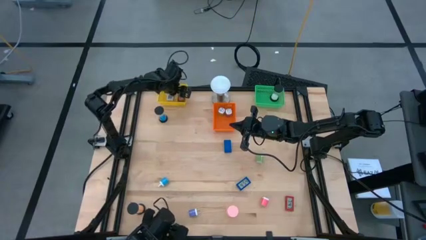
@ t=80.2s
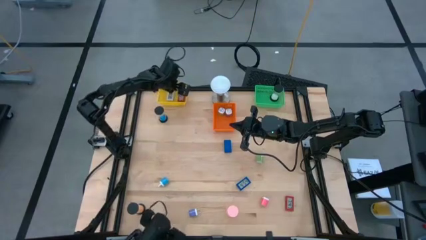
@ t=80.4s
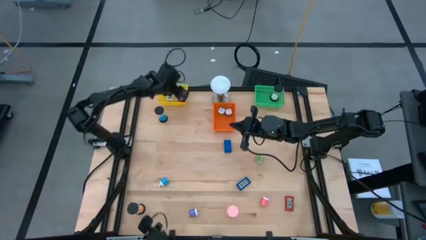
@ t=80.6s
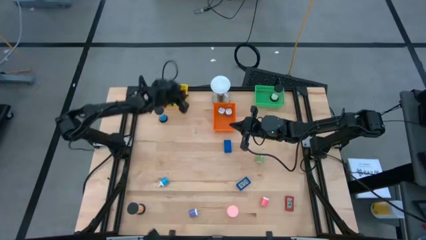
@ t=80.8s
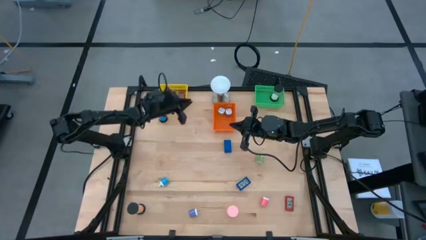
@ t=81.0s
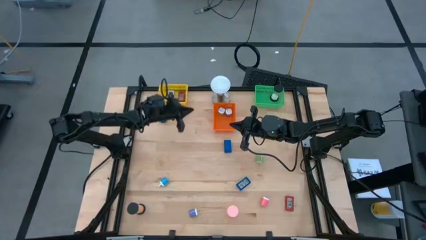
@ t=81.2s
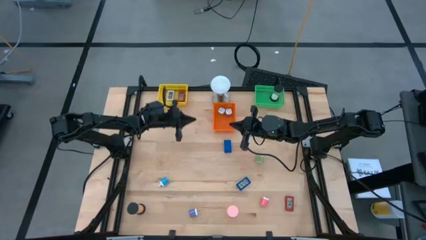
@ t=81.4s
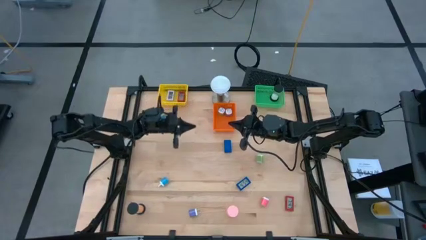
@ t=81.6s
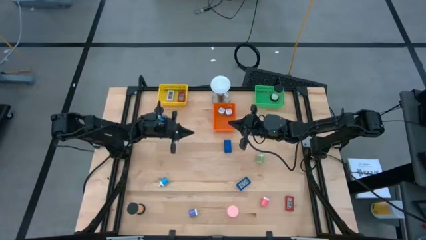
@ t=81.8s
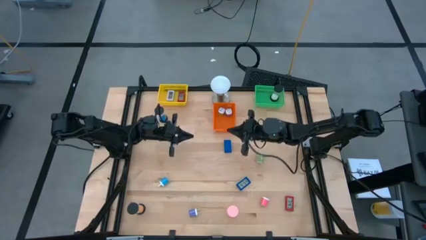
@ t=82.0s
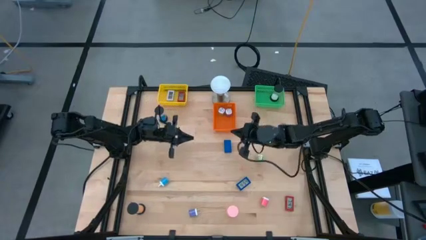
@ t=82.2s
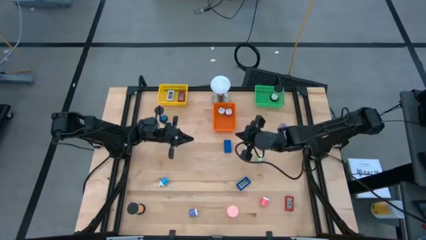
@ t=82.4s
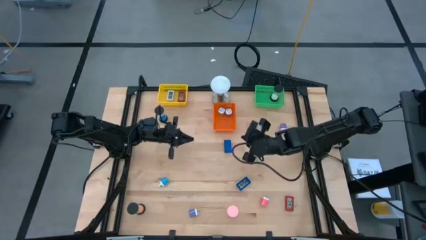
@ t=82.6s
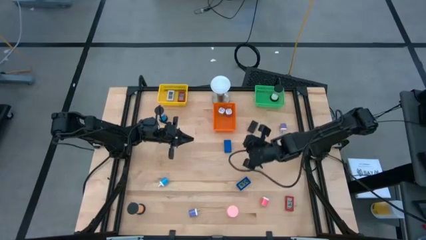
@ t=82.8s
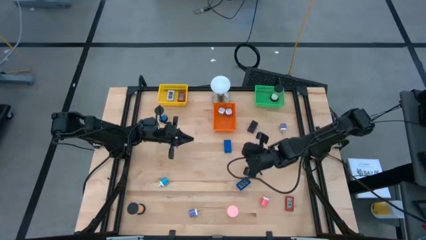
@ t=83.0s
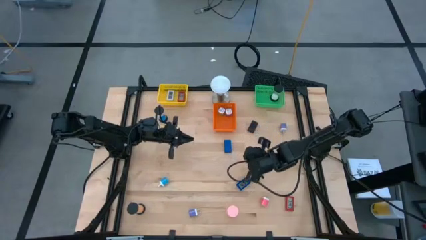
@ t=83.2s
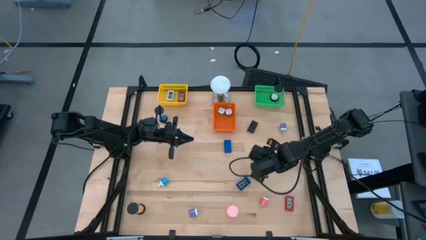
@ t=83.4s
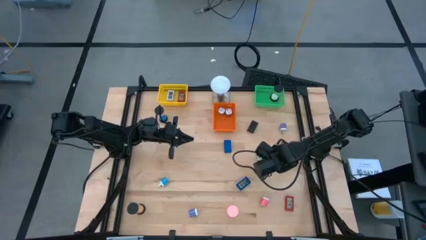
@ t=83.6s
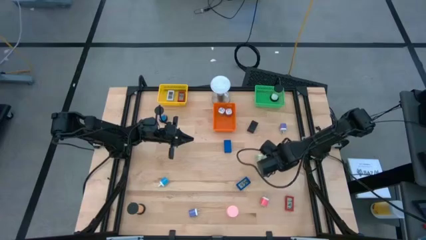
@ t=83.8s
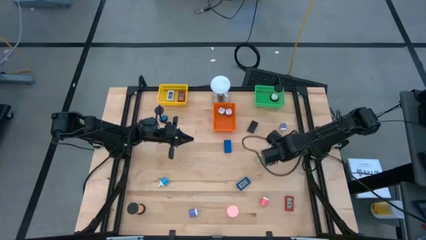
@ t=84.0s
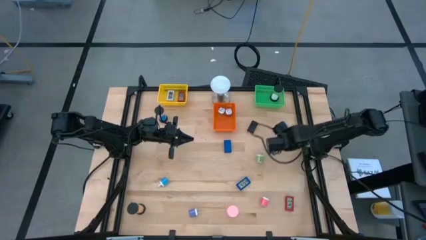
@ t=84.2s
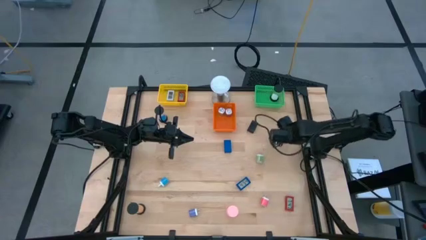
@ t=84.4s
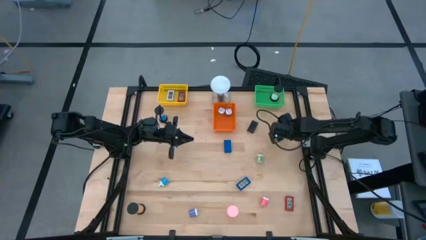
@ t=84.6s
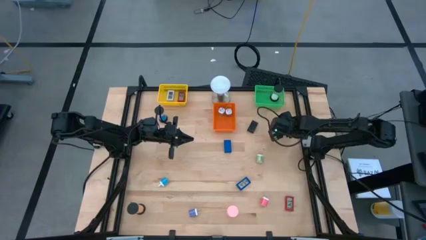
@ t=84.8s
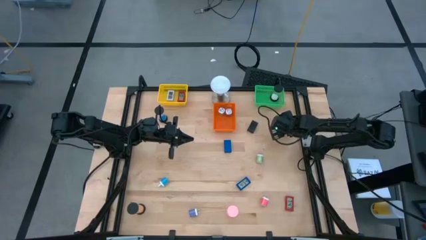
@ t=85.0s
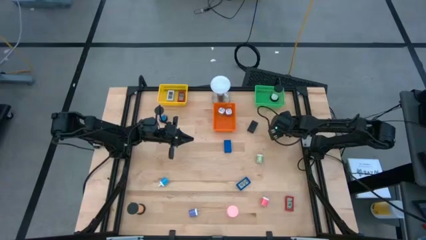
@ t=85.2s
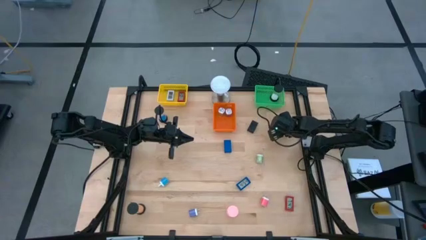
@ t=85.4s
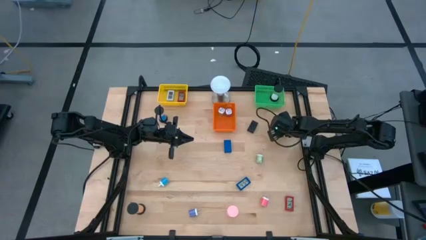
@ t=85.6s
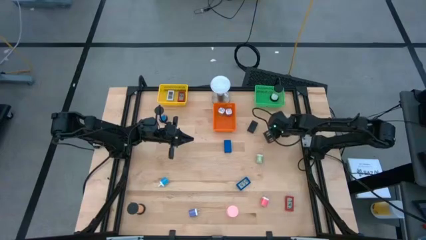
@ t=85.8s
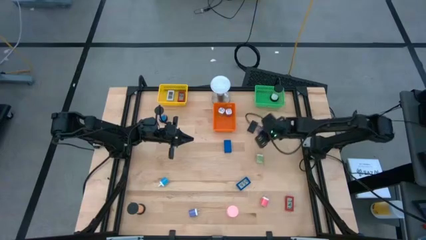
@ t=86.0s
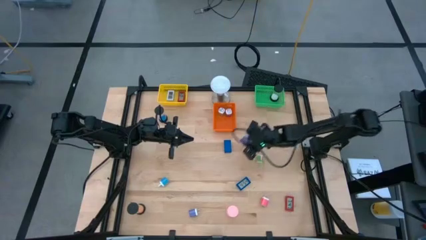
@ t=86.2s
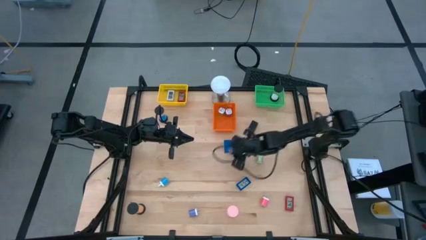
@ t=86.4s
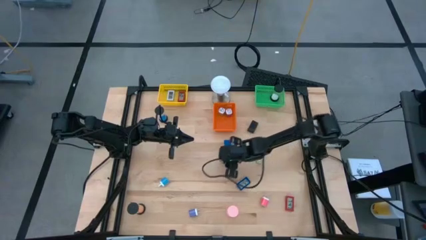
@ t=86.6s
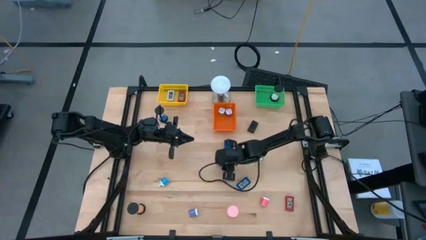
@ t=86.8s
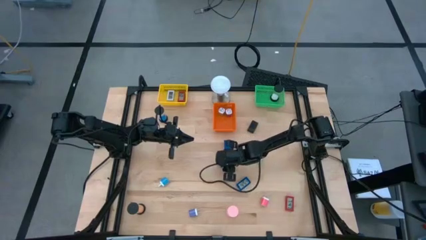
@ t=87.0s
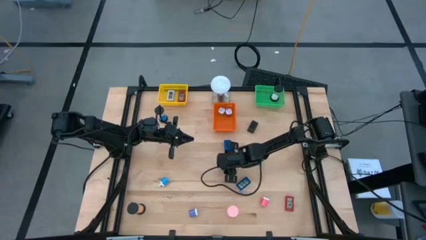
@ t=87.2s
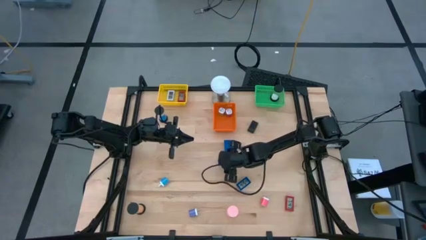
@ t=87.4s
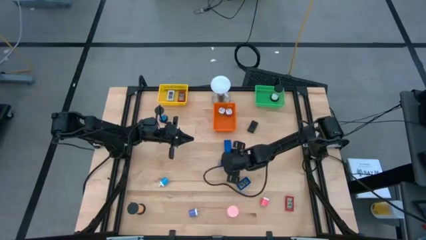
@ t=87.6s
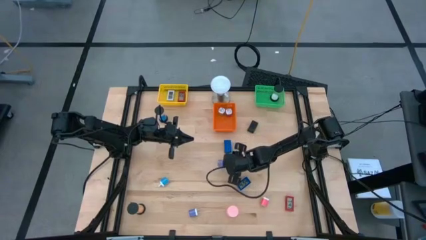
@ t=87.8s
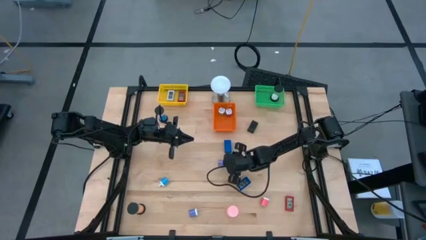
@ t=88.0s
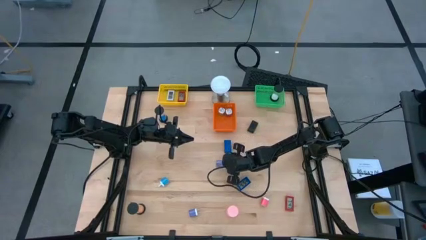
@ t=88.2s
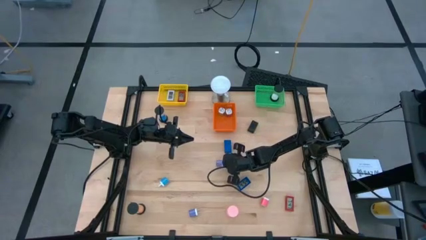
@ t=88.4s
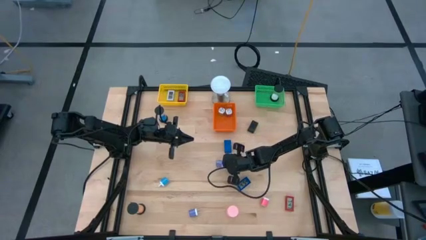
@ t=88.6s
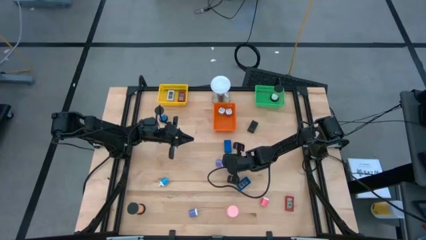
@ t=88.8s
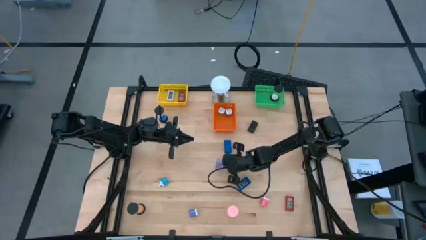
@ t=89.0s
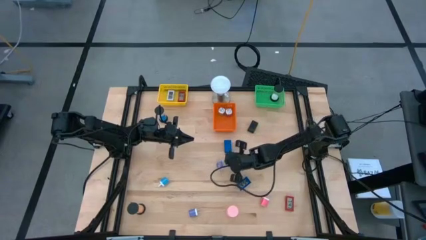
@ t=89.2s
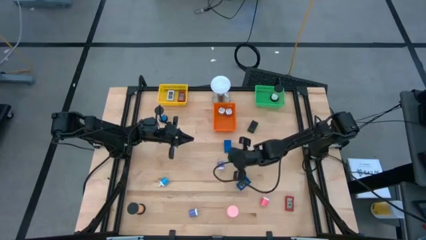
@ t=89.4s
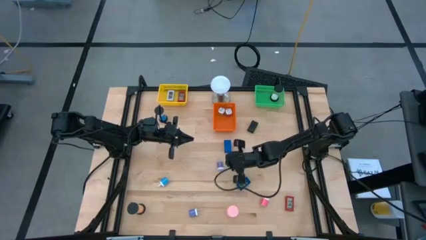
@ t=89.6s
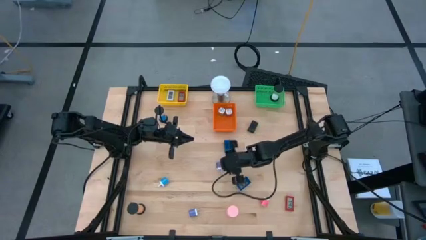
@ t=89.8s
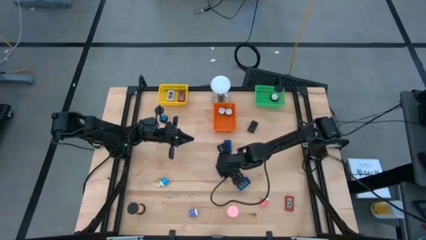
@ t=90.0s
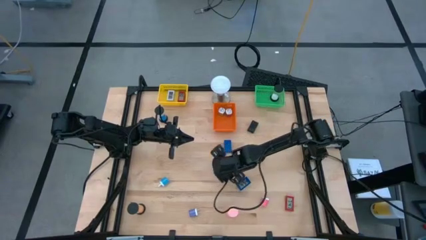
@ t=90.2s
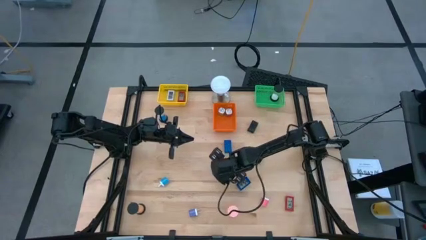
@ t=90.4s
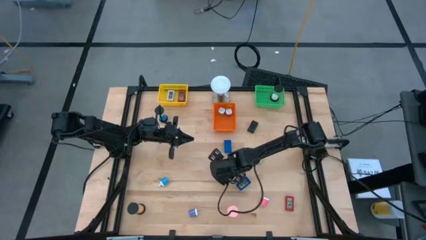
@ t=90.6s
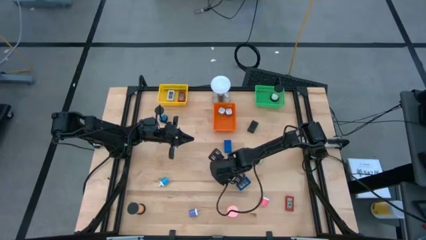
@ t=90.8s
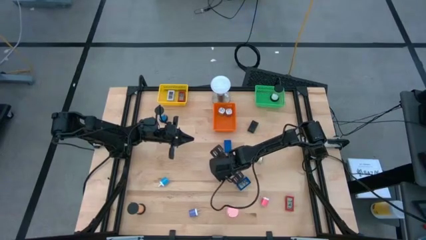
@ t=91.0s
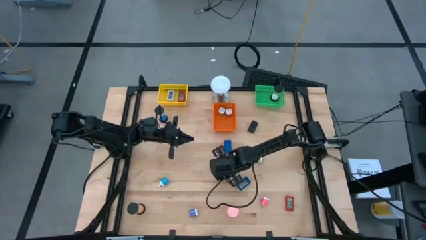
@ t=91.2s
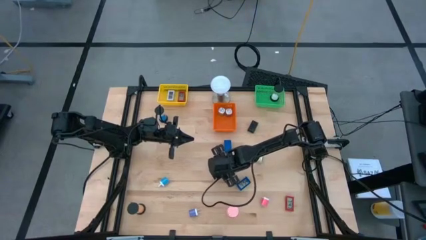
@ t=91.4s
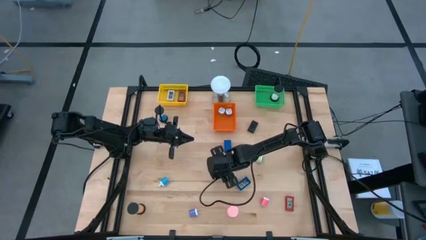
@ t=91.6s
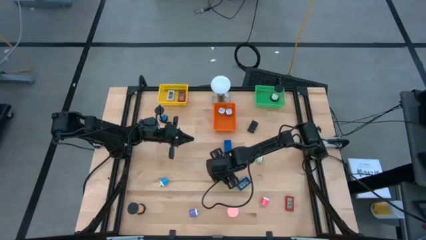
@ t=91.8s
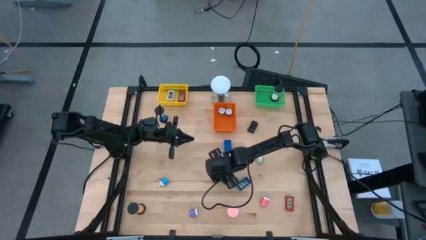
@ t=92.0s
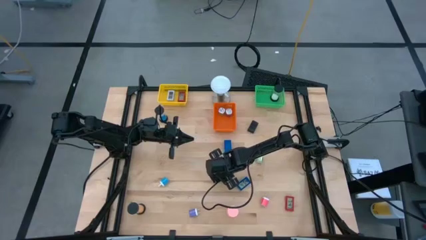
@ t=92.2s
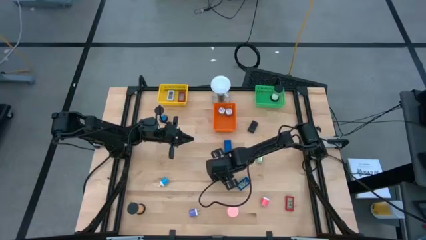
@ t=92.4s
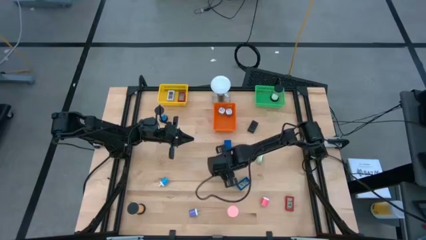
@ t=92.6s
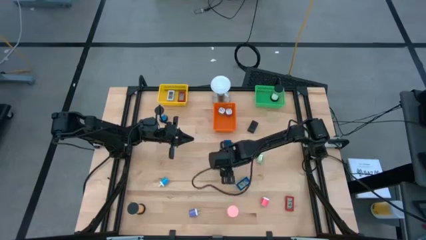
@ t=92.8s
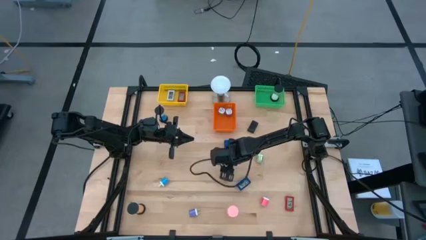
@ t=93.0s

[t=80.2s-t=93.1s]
Task: Pick & Place Office items
Put the top purple charger adapter into the orange bin
